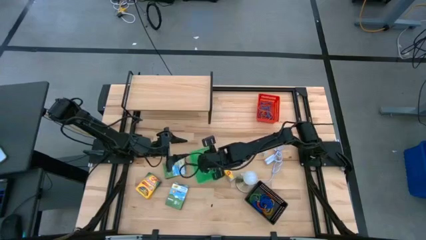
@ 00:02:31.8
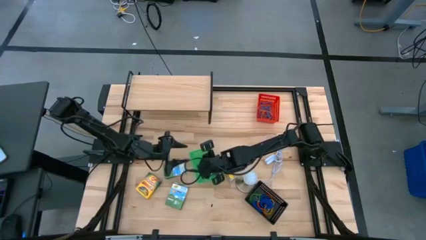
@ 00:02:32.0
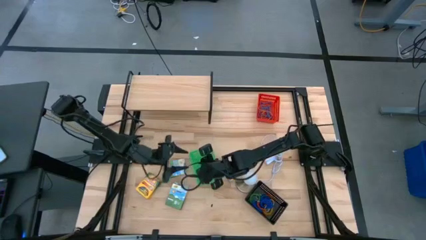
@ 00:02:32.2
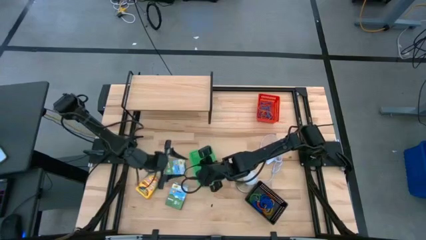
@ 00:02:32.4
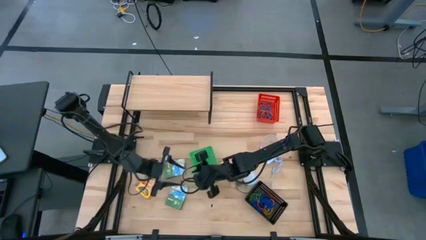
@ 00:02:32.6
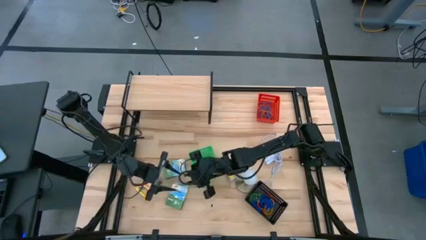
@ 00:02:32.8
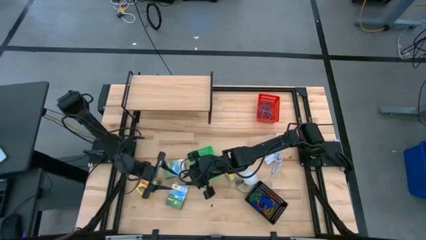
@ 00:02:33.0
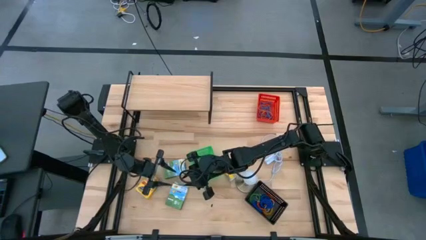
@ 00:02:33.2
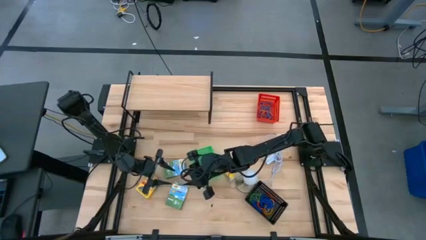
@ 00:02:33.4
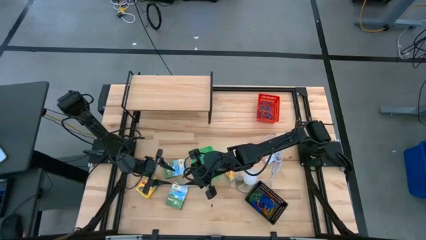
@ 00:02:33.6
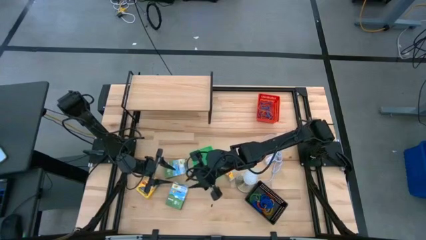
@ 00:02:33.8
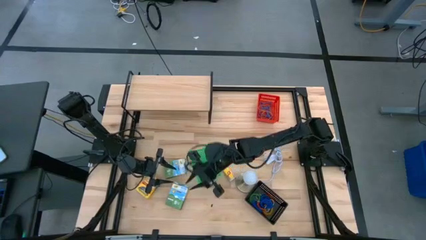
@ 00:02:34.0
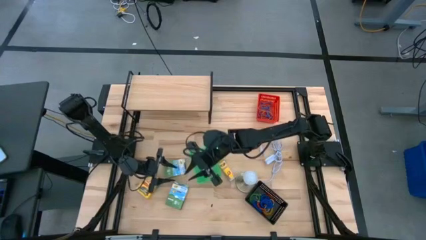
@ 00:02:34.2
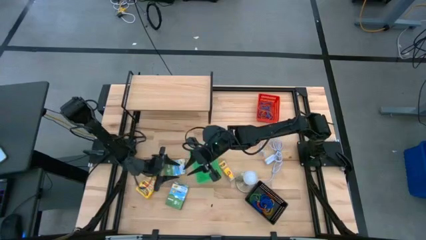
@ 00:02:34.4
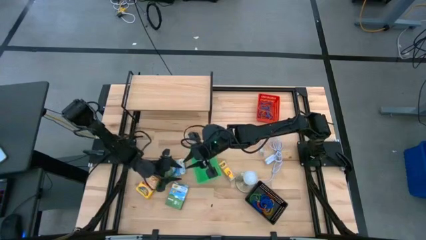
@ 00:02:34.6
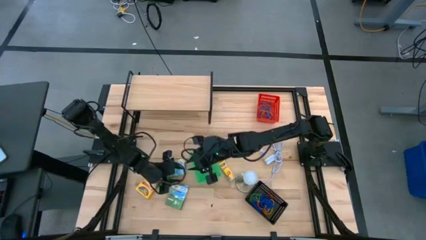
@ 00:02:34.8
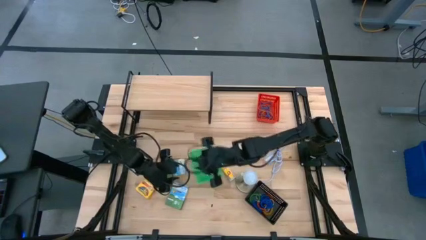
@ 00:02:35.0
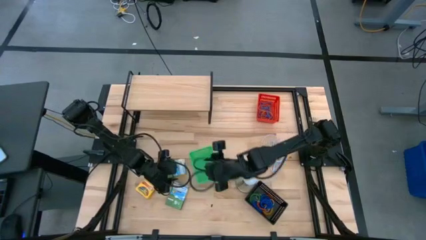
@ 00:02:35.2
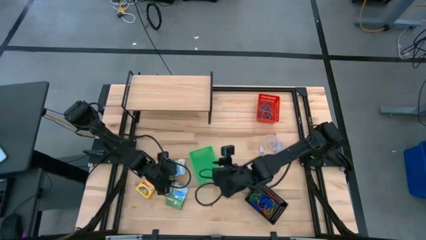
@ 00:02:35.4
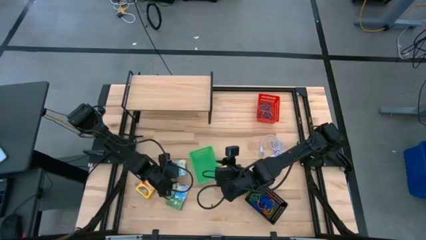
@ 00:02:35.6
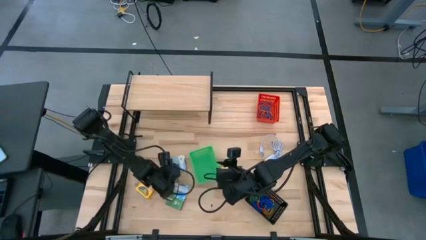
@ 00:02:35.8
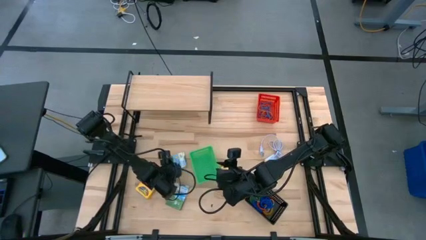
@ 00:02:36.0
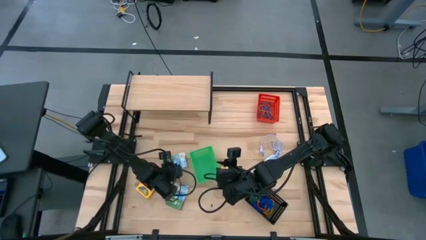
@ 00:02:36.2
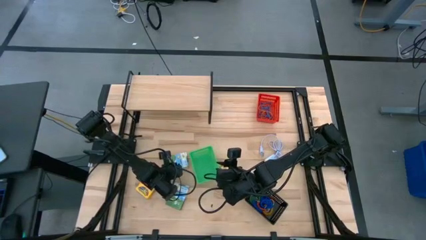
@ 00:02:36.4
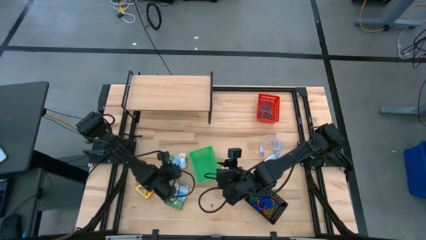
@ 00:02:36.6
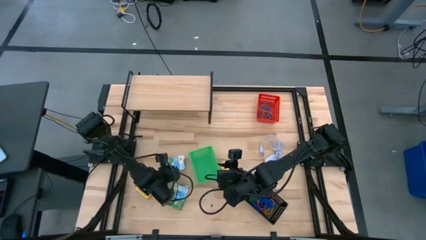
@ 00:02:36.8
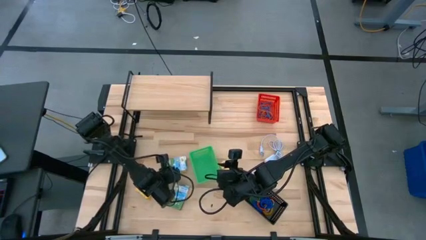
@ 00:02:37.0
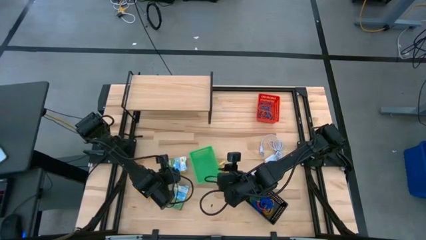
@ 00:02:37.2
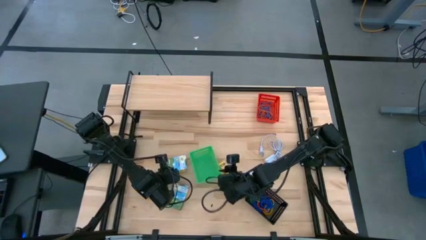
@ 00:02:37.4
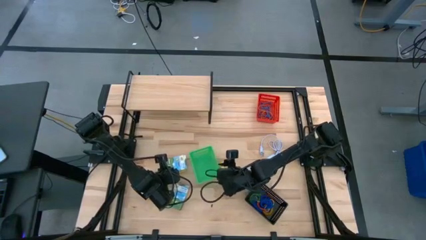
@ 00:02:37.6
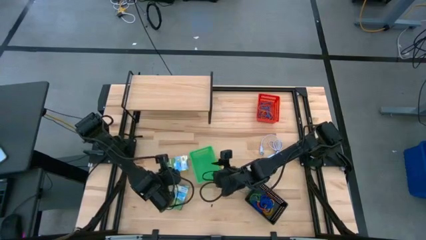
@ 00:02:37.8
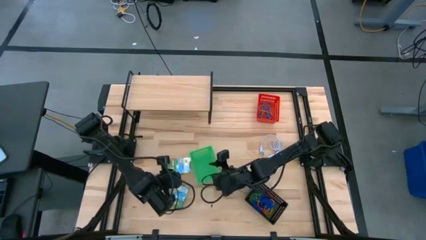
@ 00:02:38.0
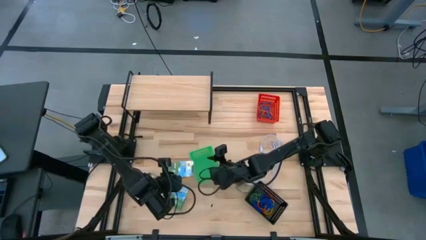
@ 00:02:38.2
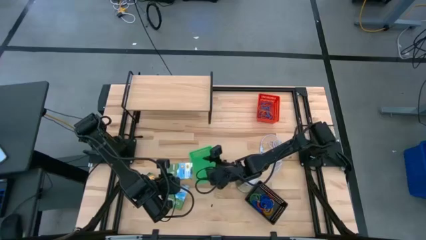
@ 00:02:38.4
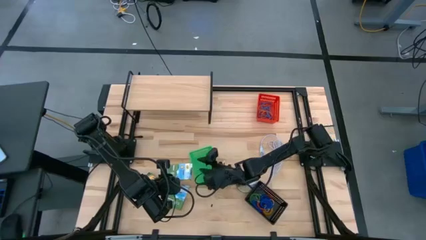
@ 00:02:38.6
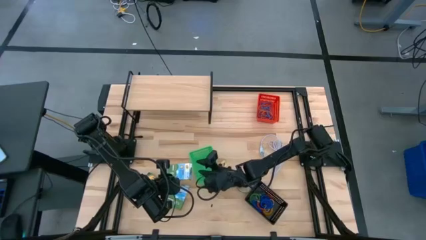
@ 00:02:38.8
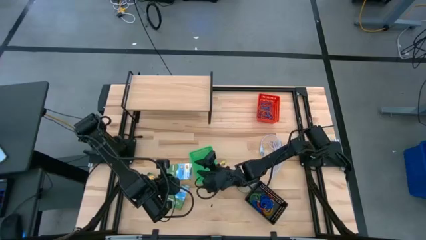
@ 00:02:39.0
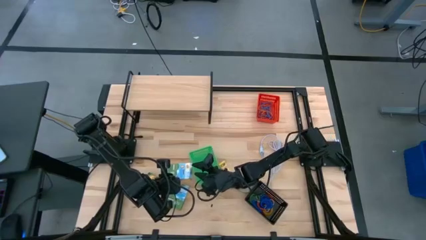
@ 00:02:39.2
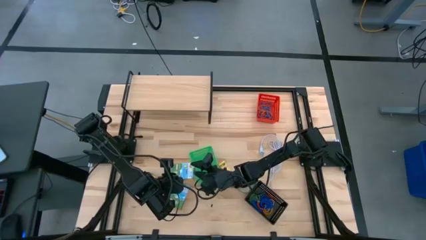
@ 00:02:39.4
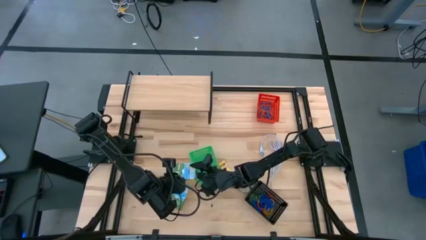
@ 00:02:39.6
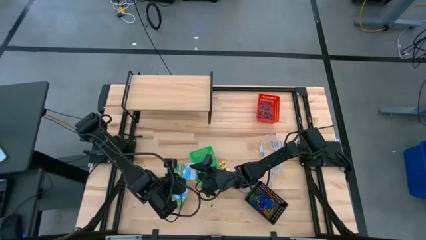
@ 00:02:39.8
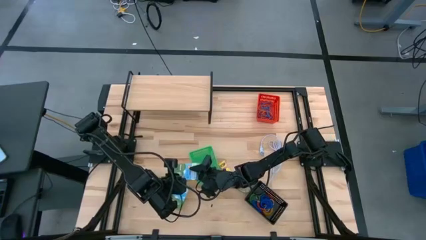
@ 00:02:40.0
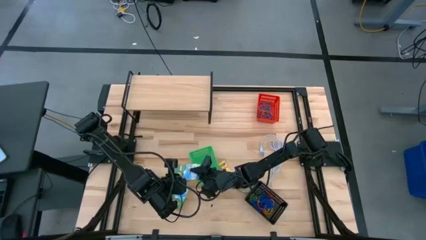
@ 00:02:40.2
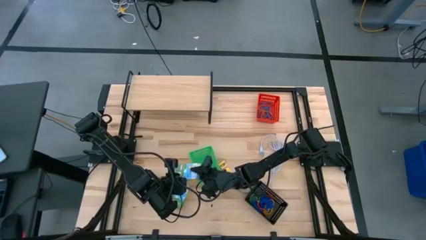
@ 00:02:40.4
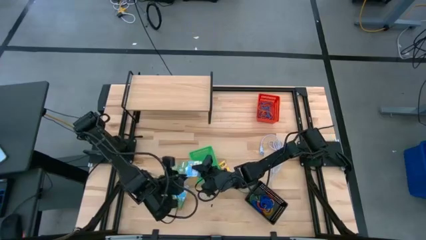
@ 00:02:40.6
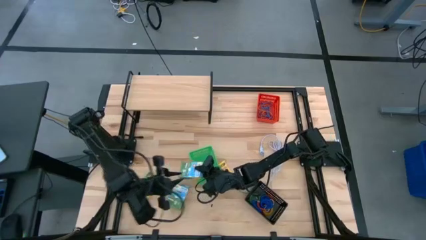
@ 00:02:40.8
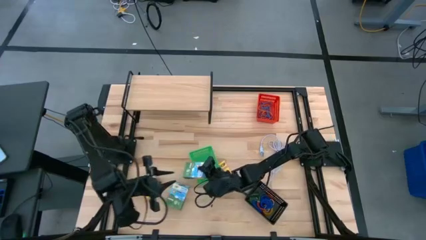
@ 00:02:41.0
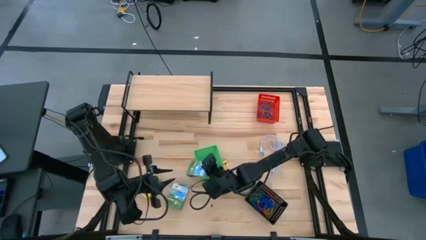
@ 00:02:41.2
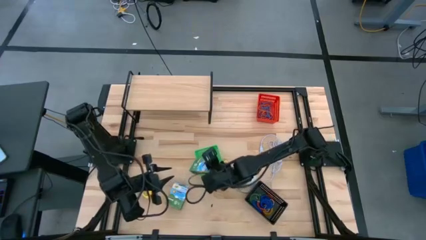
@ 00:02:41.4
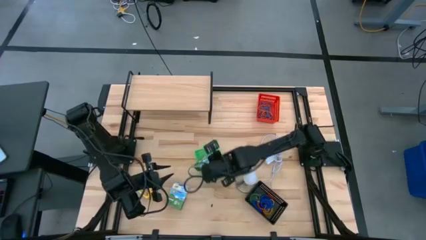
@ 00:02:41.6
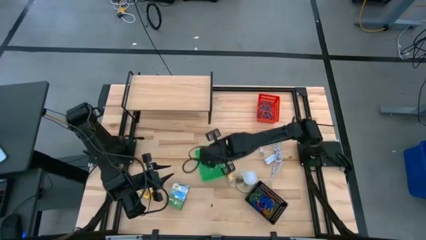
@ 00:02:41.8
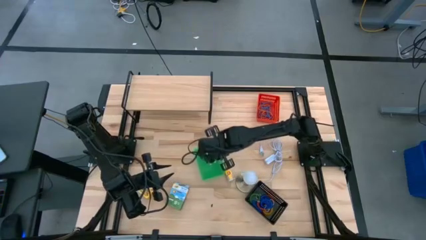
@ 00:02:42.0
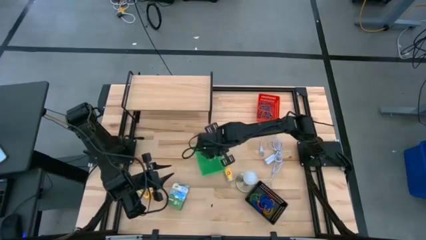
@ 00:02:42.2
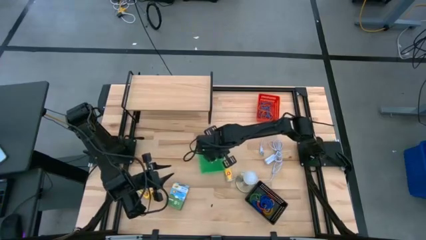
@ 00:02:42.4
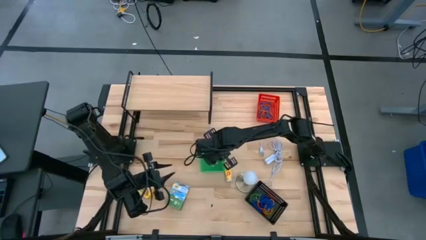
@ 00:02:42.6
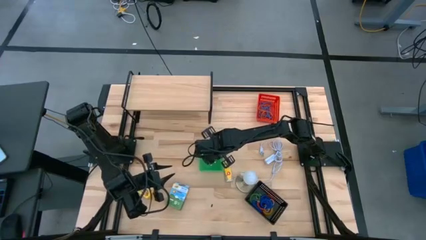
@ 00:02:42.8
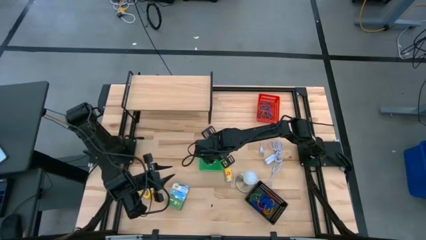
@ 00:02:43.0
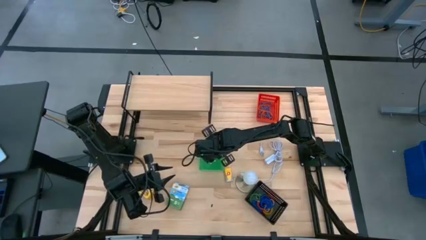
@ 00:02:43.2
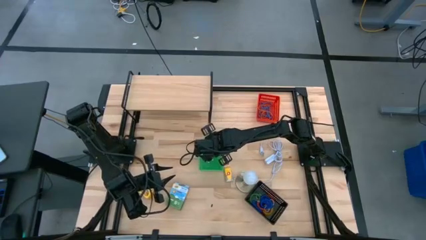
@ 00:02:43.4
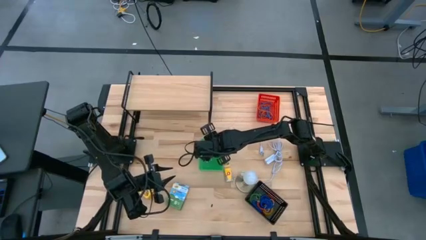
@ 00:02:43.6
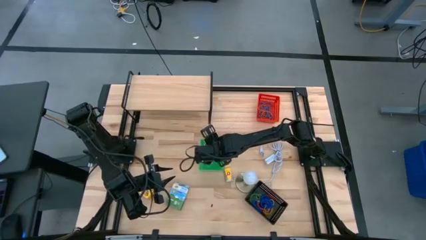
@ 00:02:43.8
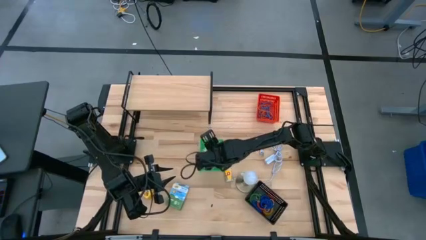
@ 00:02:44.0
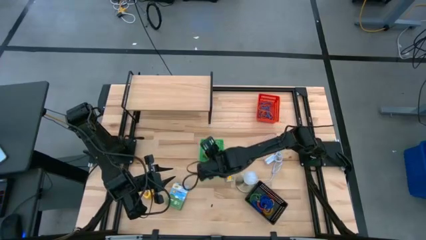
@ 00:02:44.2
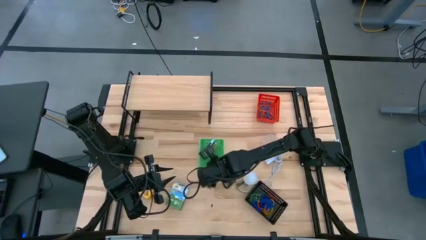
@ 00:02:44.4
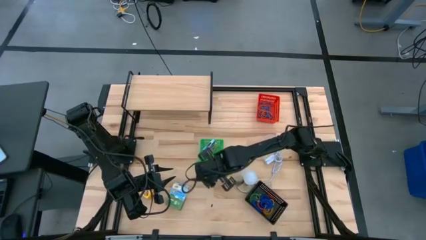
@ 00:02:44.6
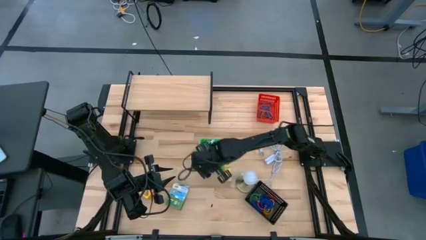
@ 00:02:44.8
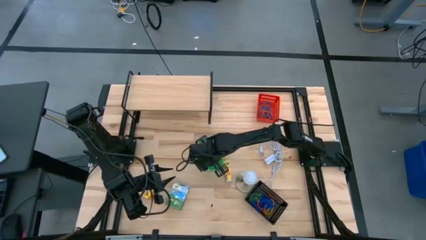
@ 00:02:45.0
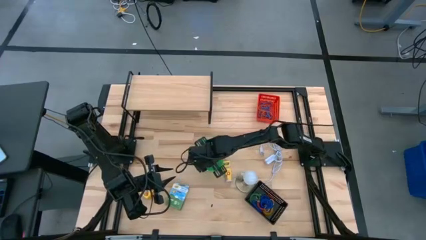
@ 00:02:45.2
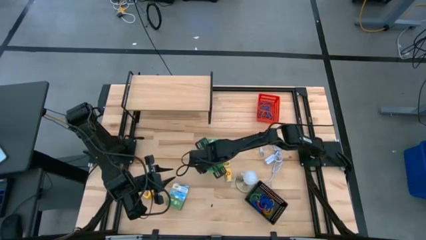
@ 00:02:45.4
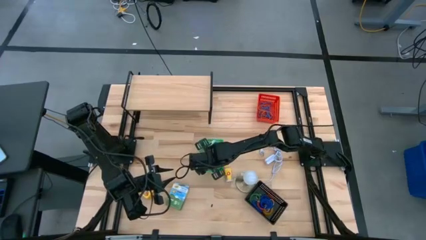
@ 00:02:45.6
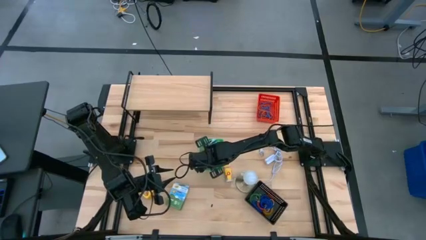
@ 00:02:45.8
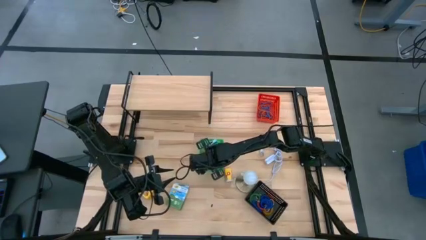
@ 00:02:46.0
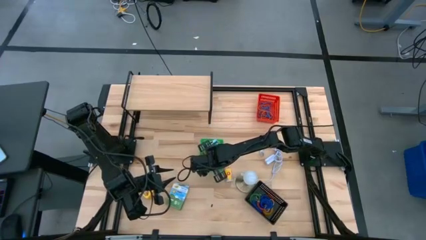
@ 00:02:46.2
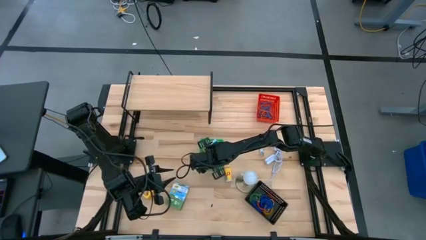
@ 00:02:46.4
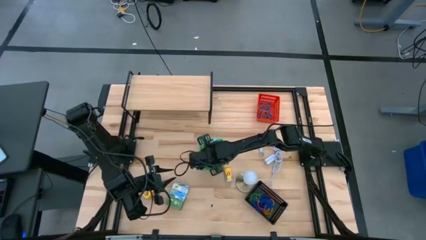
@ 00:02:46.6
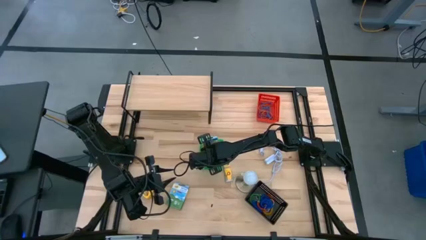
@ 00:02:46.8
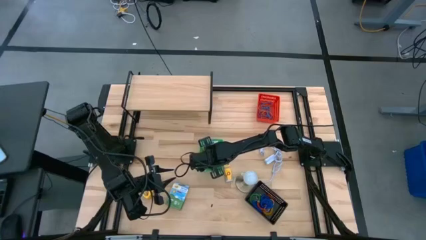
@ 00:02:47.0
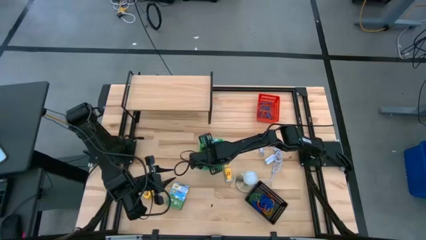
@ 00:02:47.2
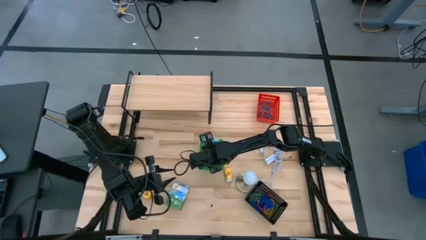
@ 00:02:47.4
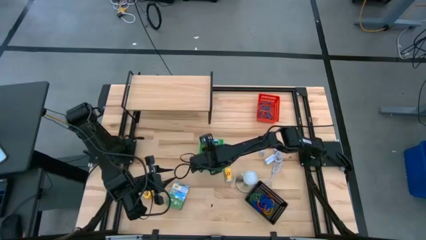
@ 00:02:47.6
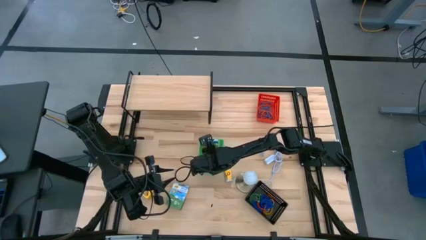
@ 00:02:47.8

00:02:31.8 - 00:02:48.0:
Task: Pick & Place Office Desk Supplies
Put the yellow crayon box into the green basket
